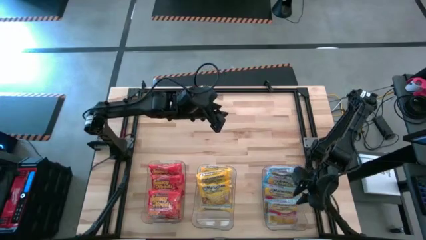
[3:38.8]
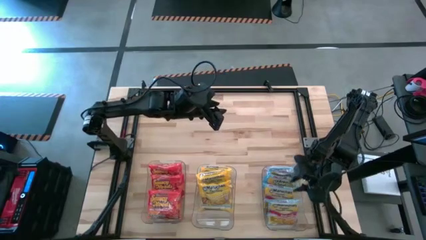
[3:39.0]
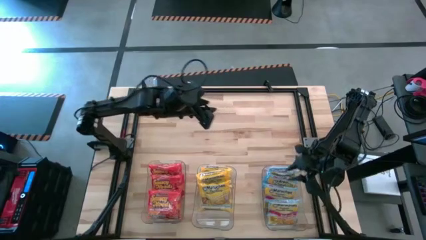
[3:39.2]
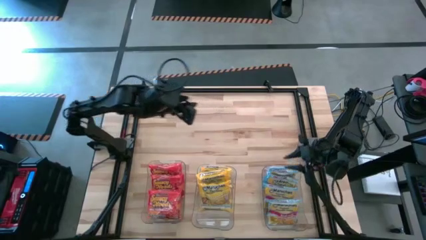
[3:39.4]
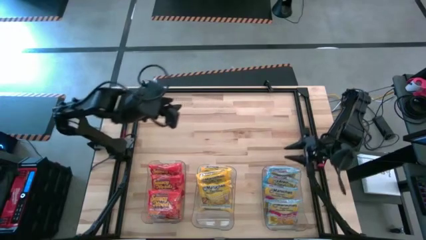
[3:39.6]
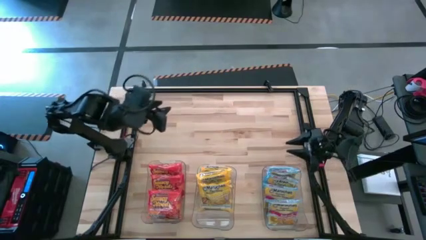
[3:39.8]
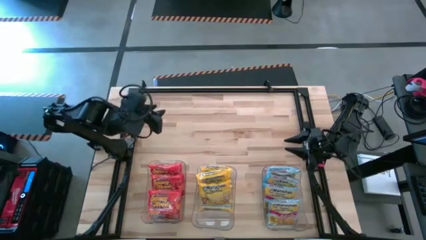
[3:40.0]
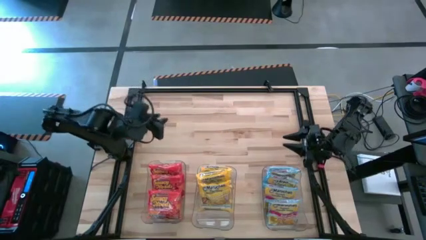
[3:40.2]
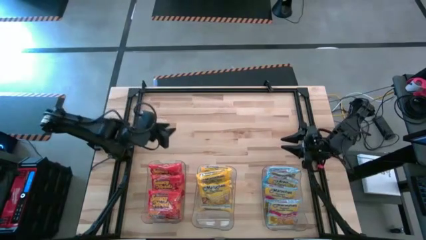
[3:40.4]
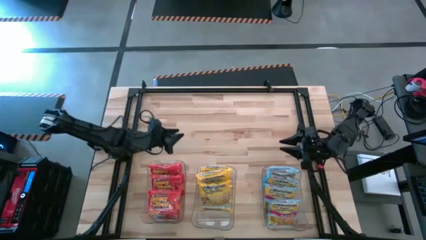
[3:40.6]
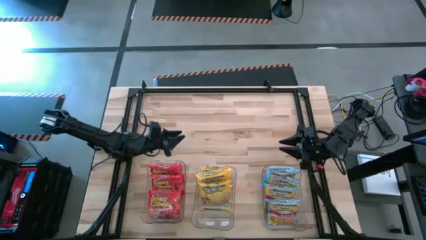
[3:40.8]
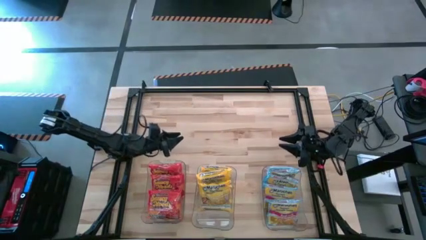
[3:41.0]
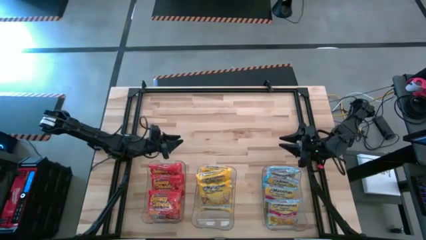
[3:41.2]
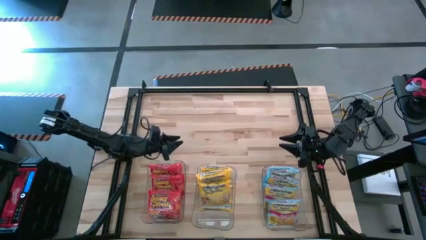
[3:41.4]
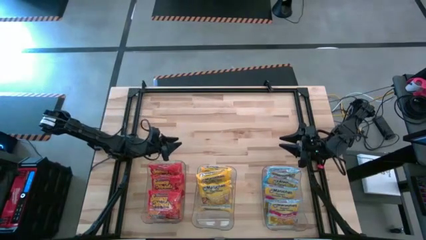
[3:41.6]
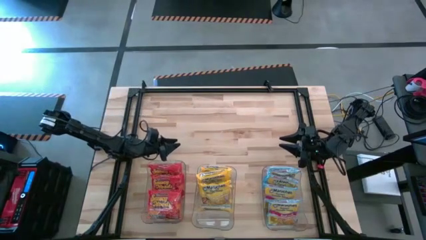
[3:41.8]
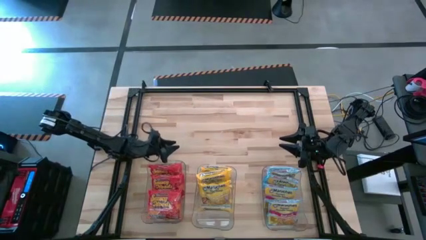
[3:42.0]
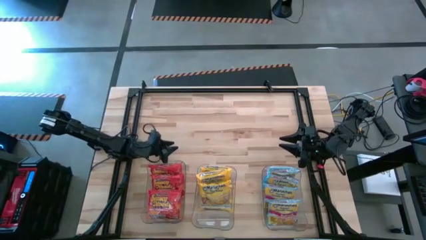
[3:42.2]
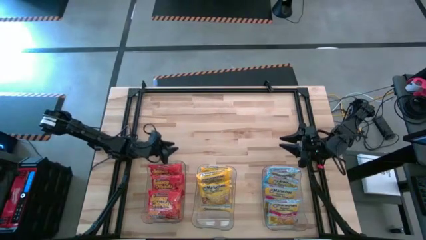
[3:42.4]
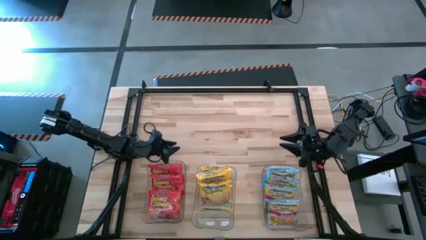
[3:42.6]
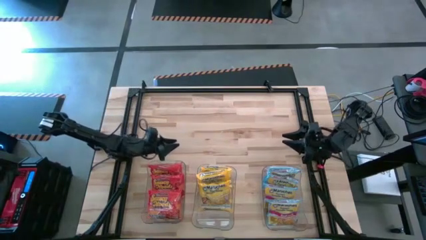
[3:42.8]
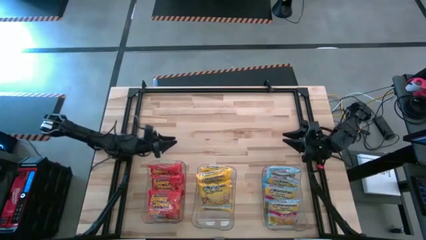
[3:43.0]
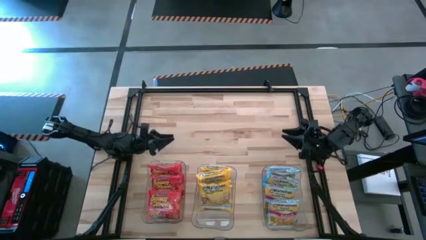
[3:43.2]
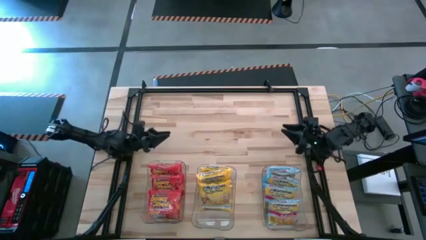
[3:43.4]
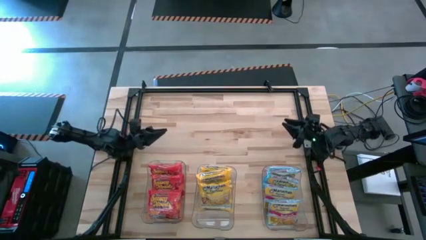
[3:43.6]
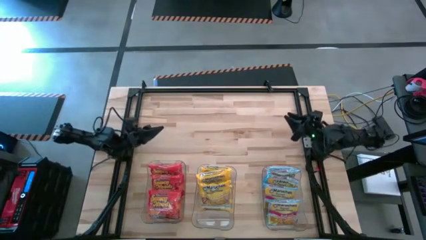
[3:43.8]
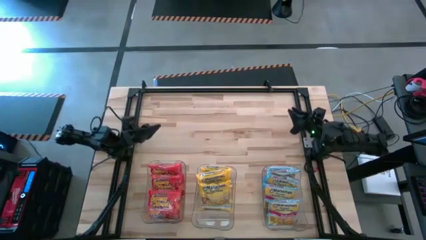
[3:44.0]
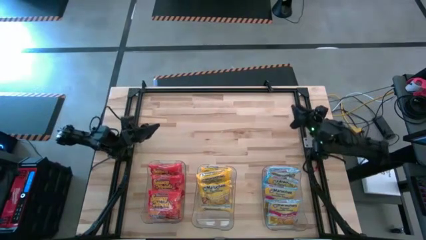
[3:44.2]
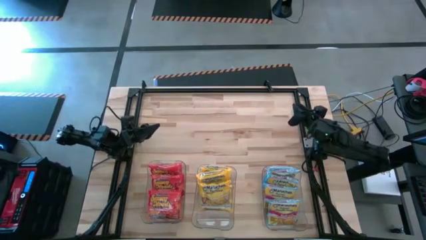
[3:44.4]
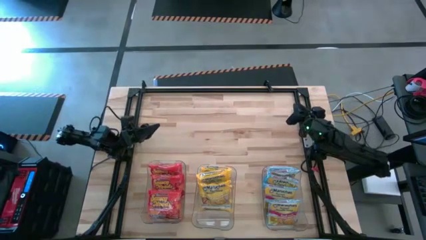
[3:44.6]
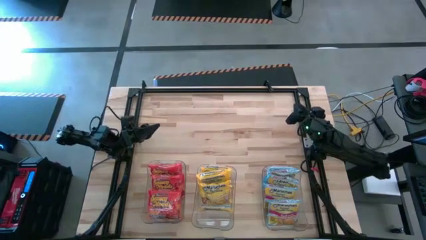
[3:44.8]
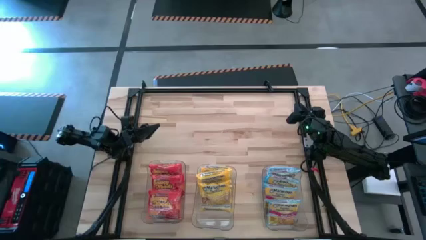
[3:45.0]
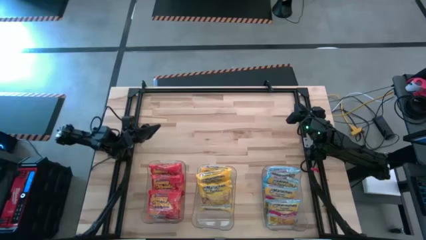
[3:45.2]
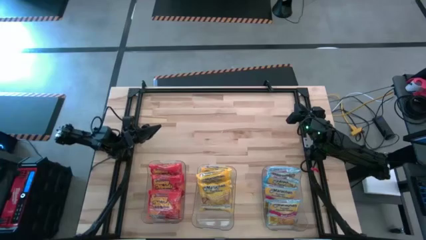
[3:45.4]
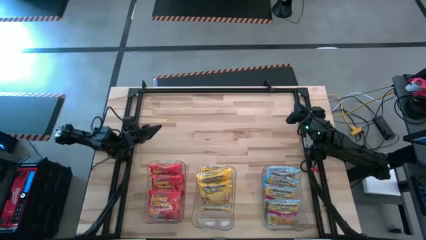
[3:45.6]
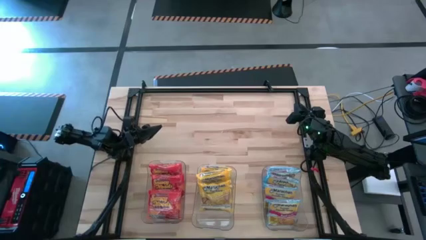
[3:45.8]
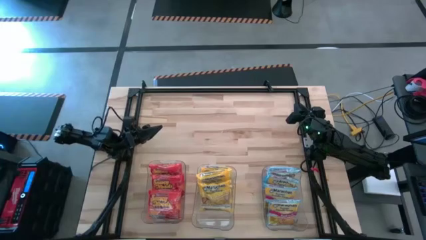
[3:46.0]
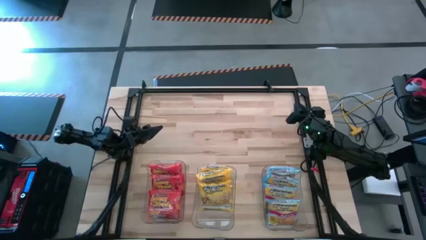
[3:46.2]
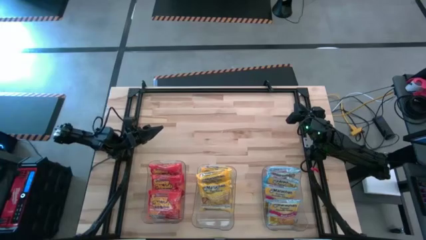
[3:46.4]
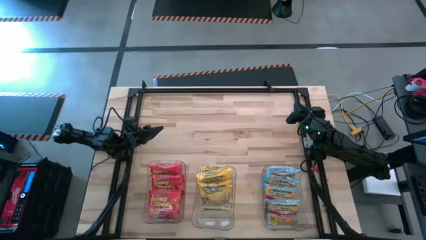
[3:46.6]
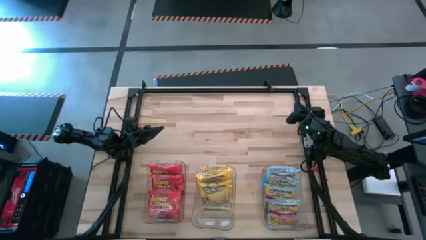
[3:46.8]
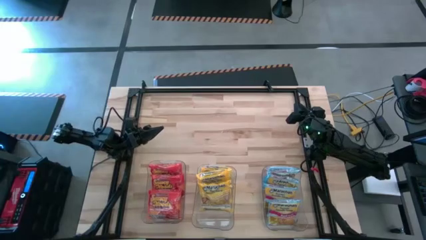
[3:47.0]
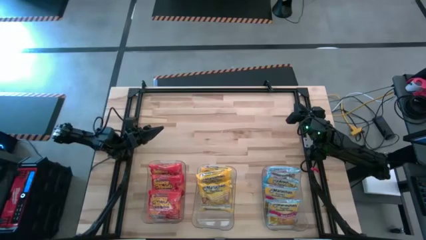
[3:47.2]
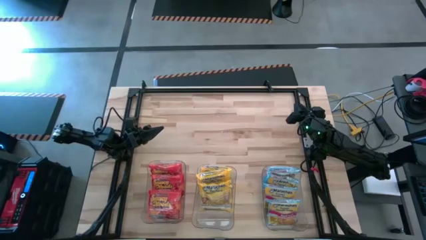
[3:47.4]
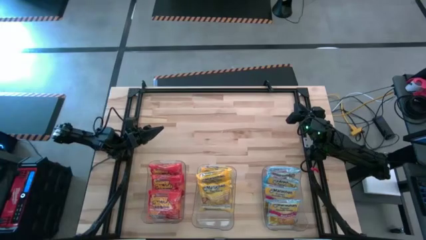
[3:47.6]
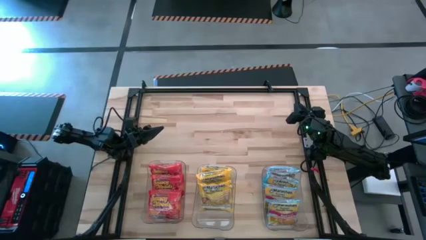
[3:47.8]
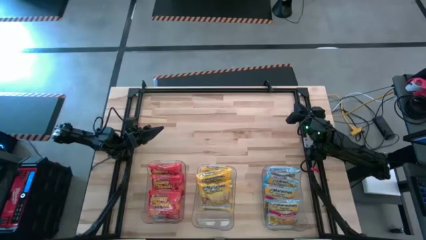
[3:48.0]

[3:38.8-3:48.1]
Task: Sort Maruchan noodles
Return to Home Position

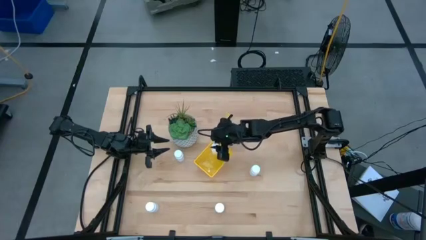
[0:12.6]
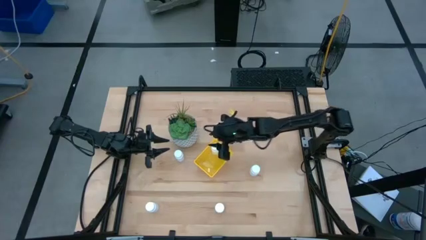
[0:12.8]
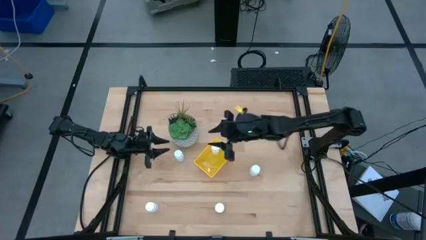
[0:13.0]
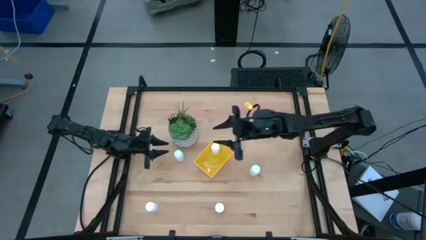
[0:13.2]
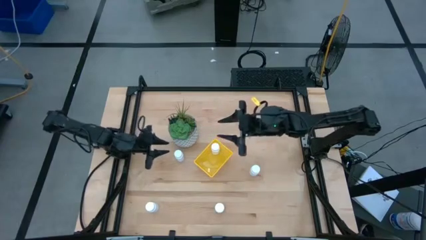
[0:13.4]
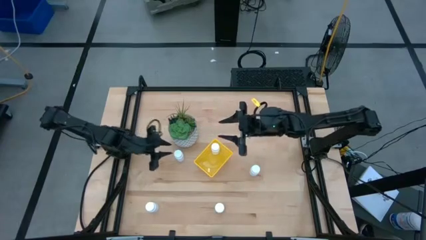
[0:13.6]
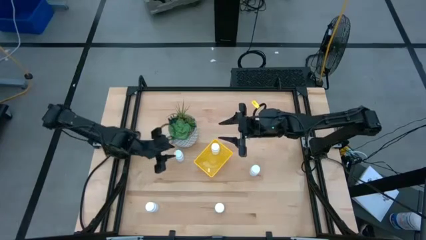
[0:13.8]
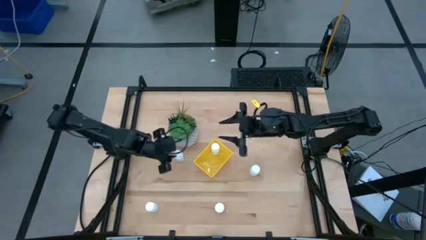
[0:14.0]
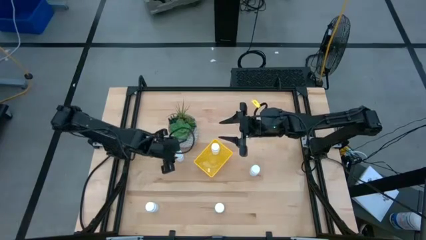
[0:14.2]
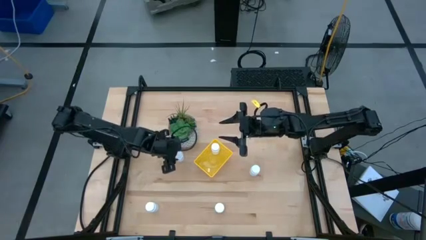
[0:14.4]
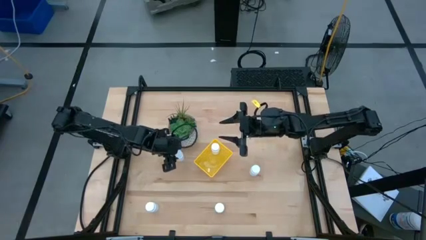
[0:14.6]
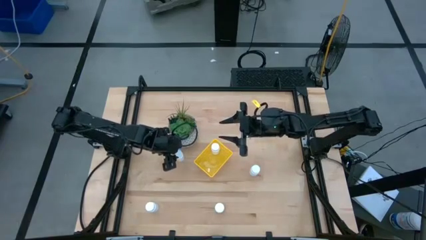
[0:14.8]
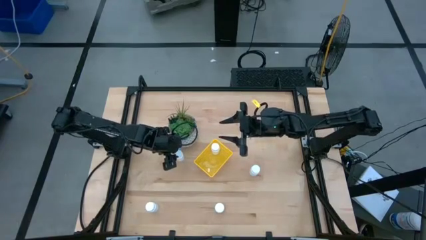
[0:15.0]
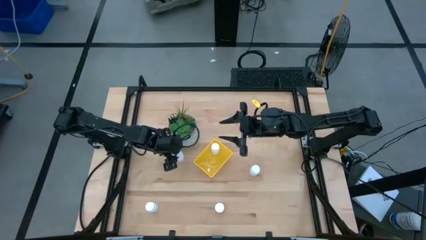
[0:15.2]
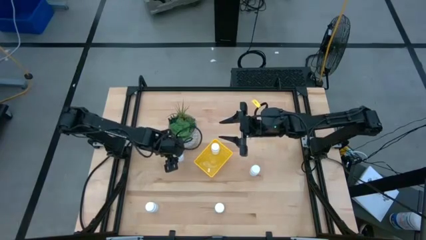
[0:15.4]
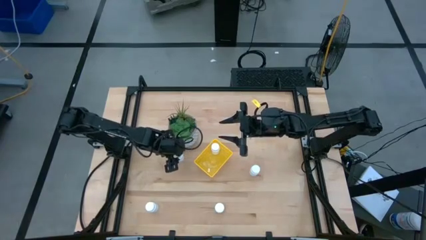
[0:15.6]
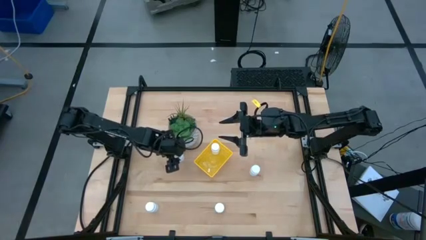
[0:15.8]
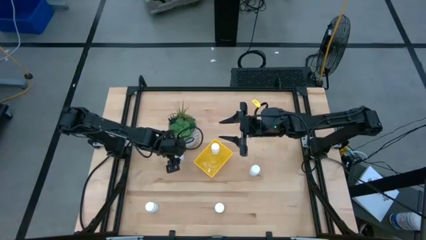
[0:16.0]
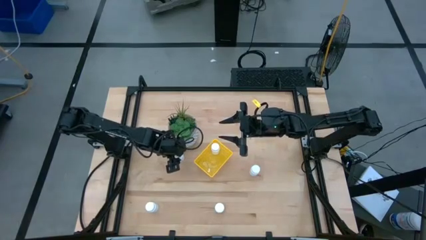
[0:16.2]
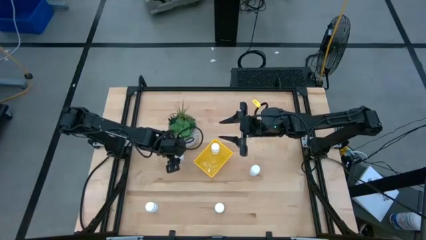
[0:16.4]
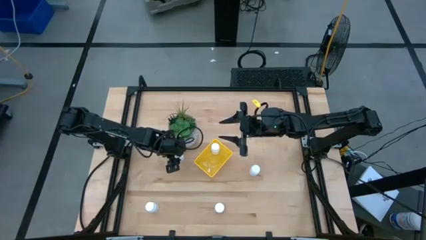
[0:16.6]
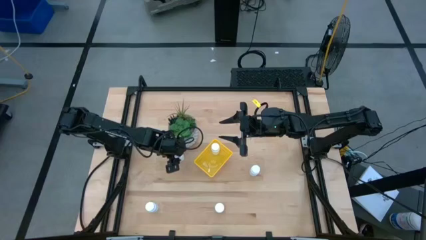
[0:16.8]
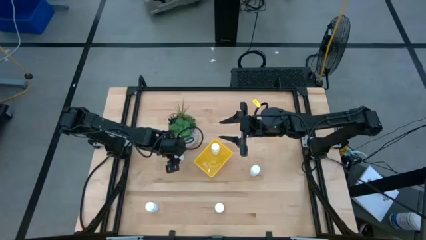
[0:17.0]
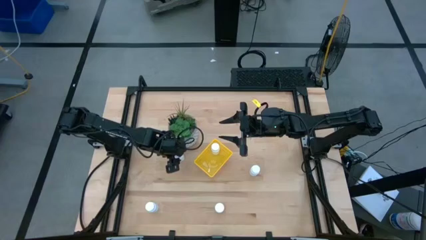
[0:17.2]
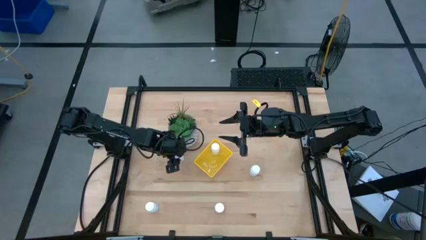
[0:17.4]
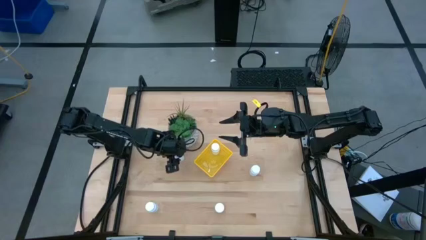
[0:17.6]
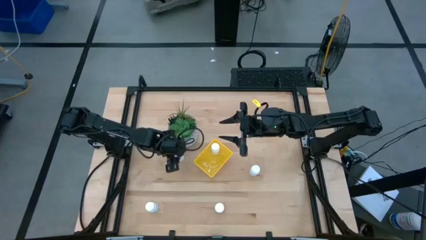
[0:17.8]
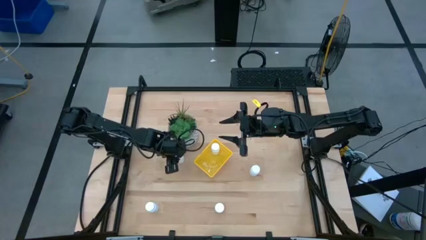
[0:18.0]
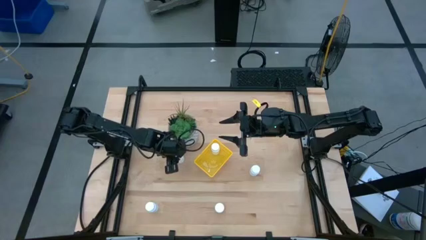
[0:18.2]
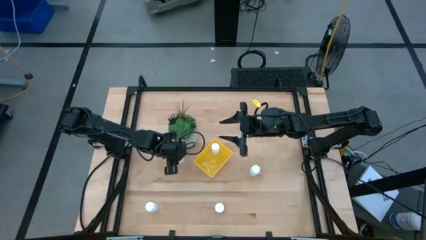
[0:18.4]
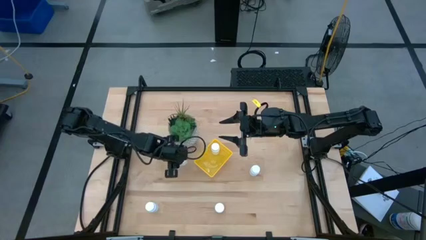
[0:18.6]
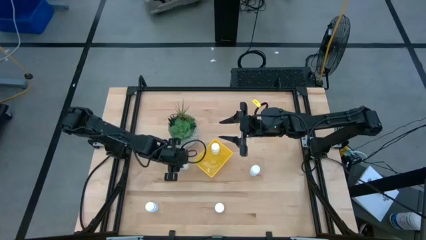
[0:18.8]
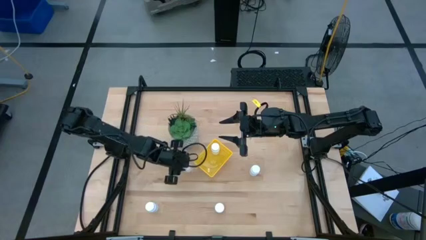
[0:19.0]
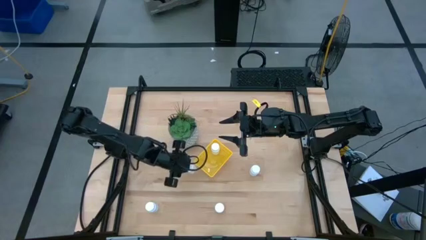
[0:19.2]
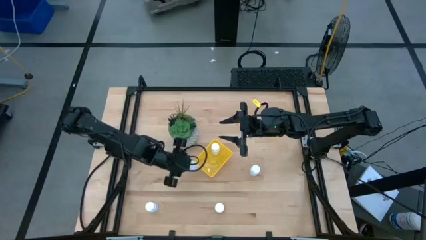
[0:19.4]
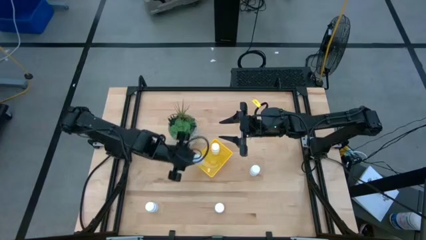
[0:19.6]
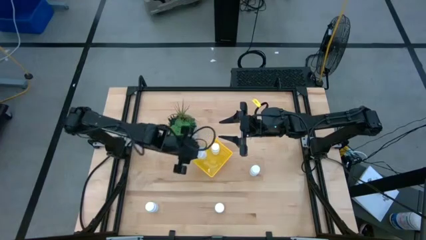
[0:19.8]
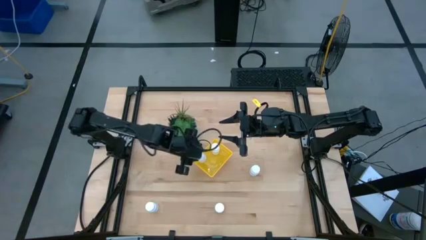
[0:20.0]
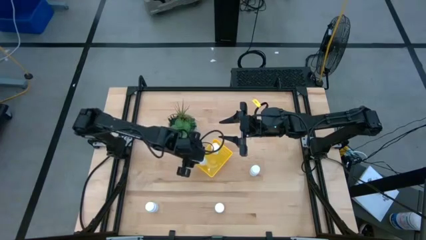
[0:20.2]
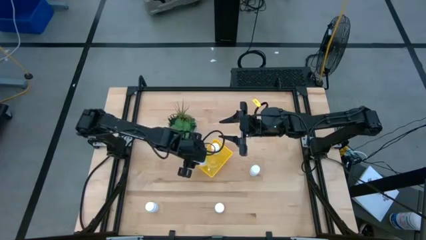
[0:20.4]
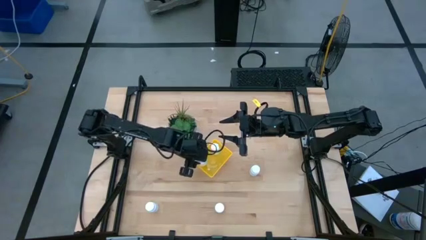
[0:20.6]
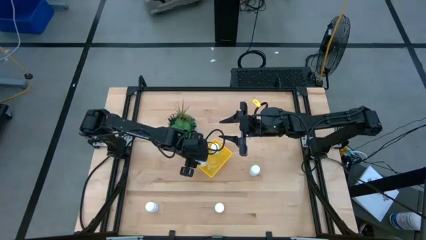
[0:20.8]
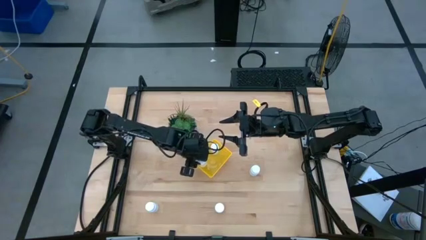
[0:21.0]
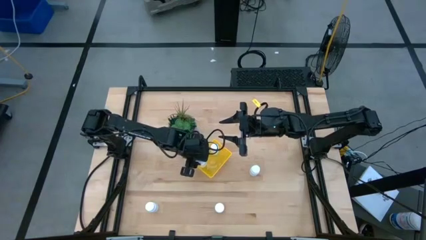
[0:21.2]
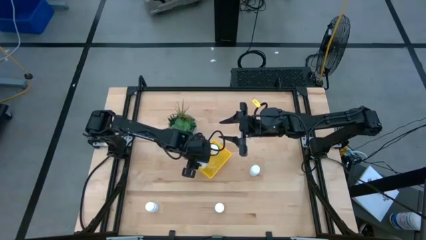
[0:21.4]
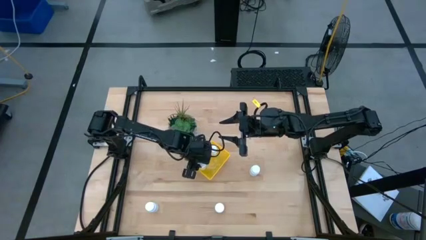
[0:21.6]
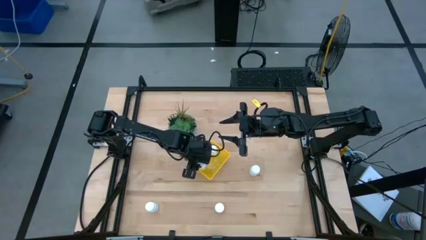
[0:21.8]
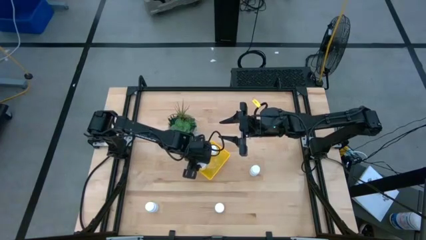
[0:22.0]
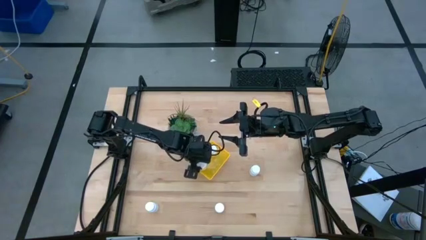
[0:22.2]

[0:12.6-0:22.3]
Task: Pick and place pill bottles into a basket
Put the white pill bottle into the yellow basket
